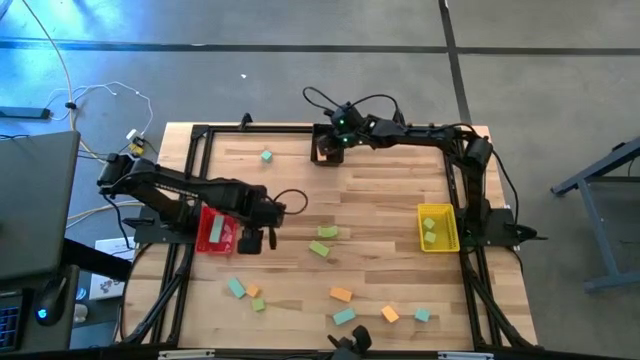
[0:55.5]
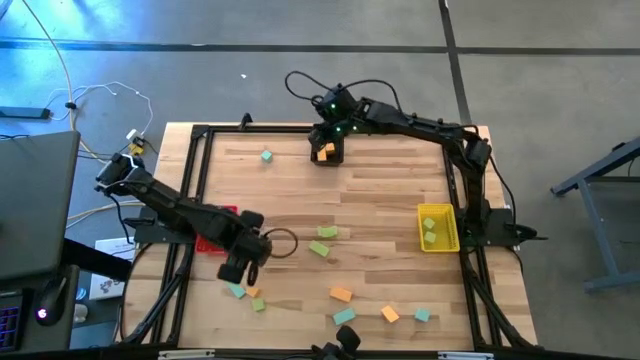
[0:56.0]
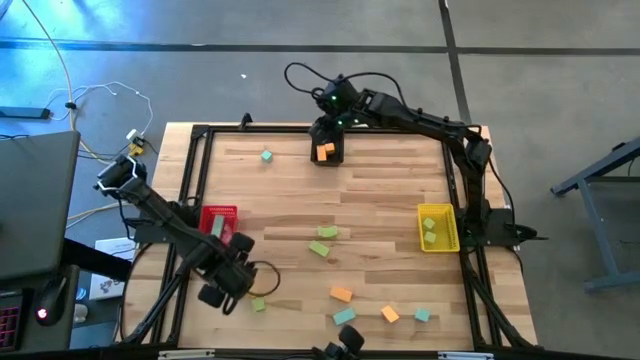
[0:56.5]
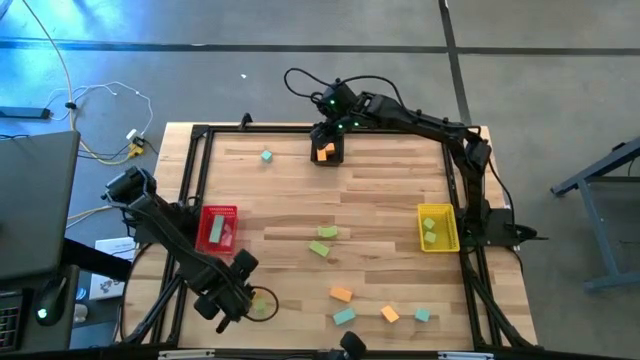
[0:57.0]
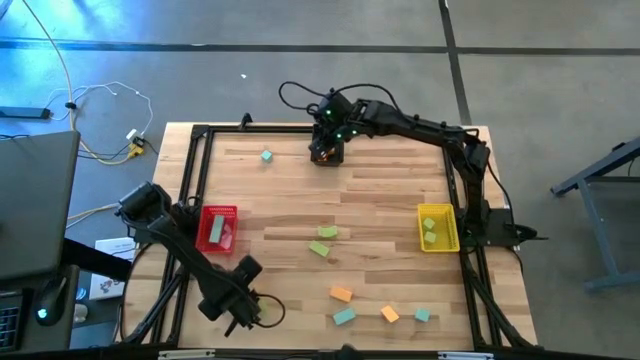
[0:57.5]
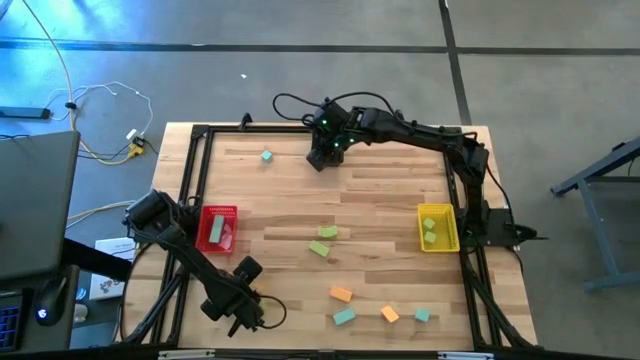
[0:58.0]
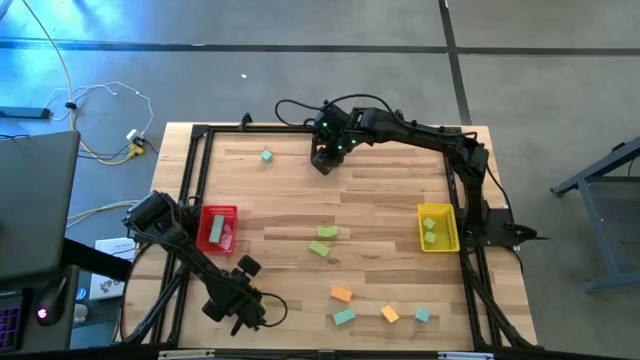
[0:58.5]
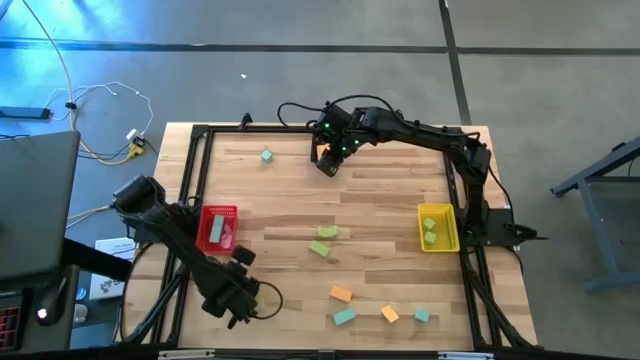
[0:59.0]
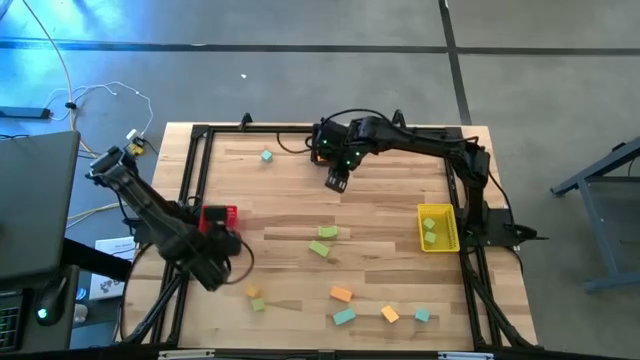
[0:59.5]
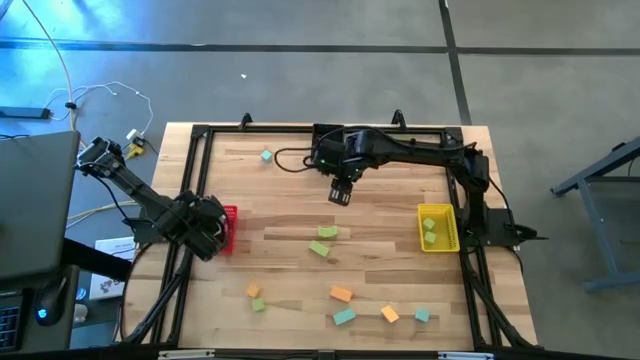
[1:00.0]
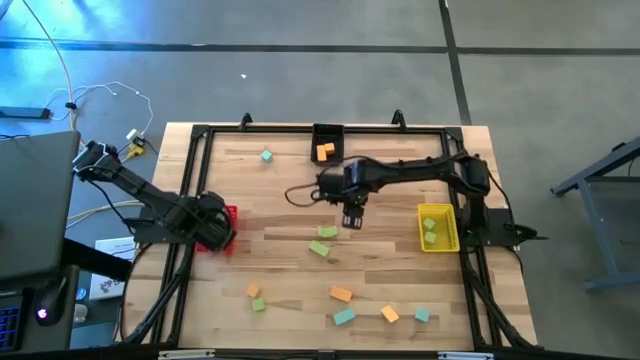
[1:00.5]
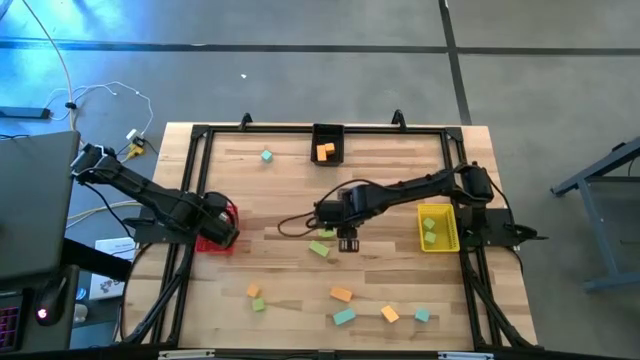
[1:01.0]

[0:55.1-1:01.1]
Task: Sort & place blocks by color
Put the blue block into the red bin

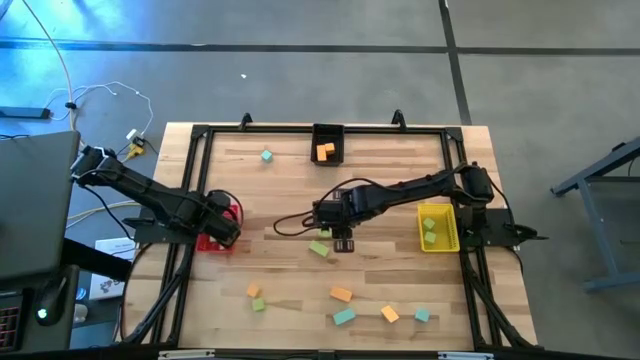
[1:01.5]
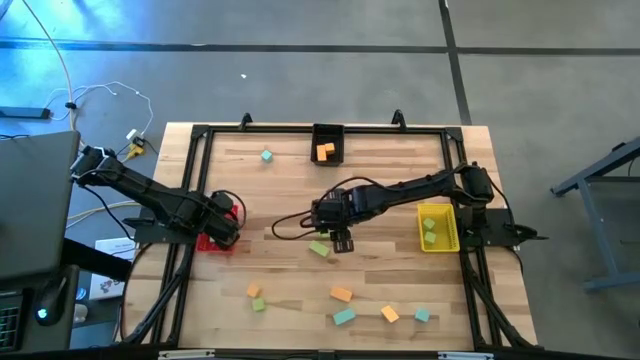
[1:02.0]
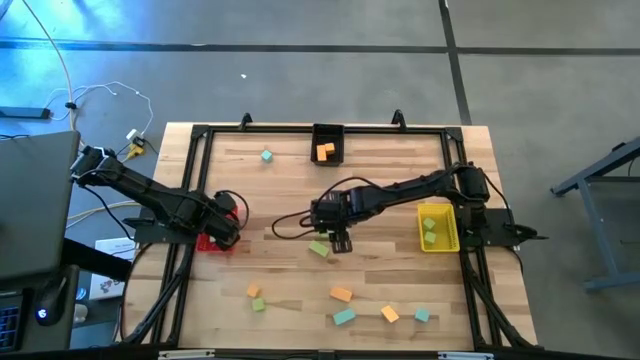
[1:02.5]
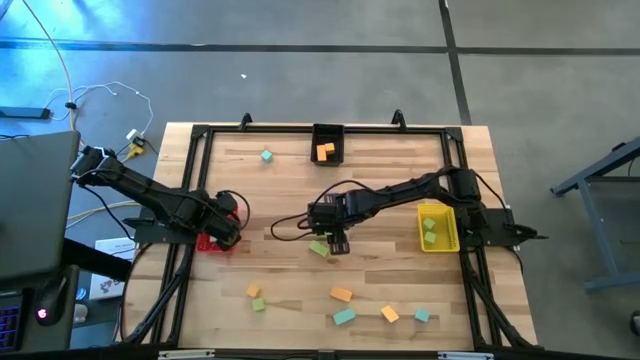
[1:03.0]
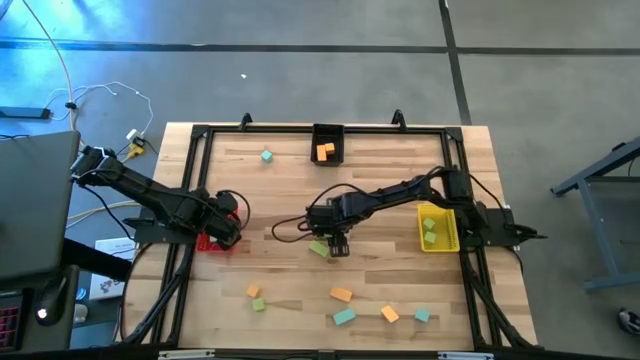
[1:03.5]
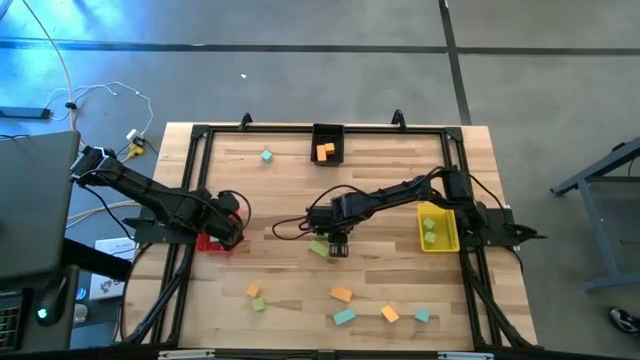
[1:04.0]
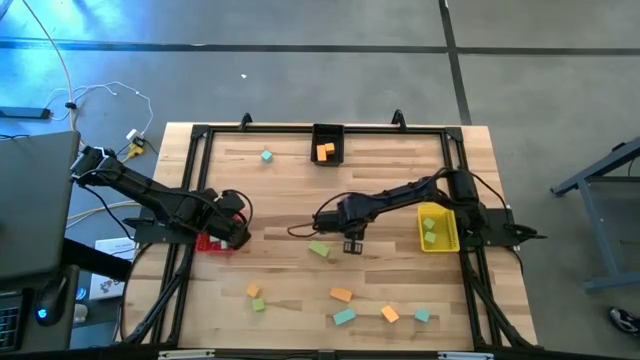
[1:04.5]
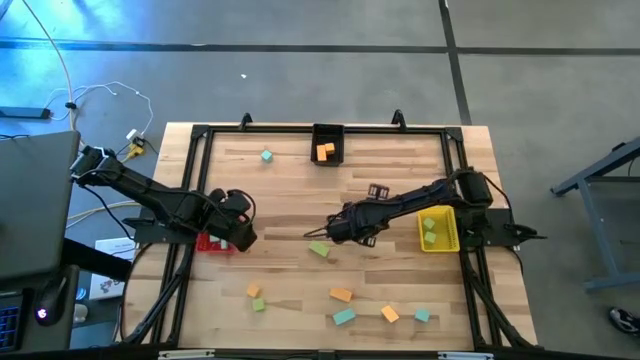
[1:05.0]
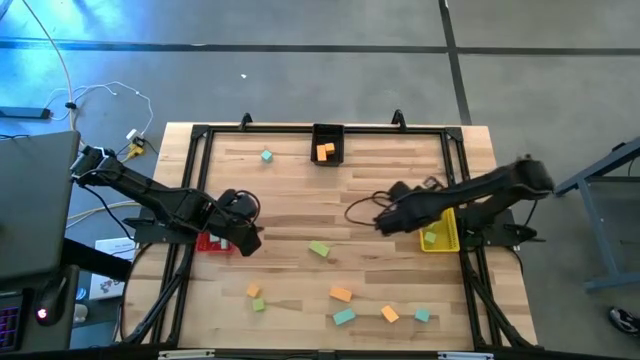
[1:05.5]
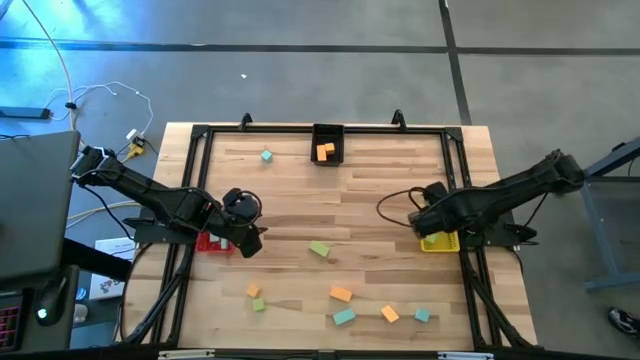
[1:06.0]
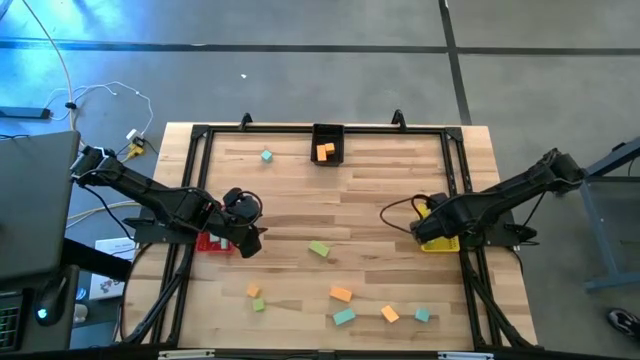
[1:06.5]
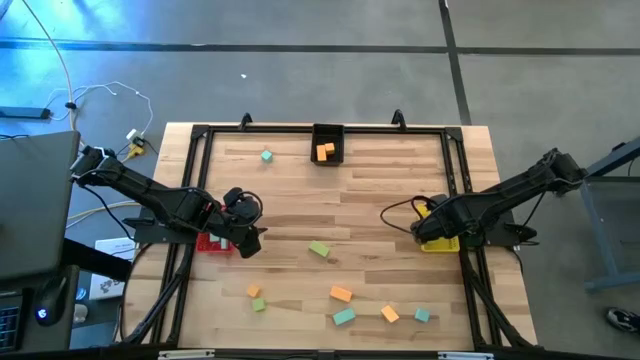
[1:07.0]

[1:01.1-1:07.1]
Put the green block into the yellow bin

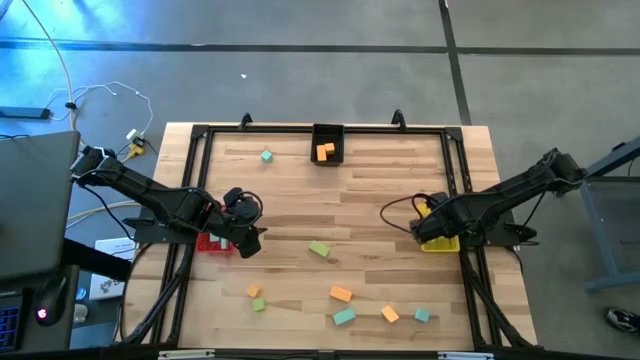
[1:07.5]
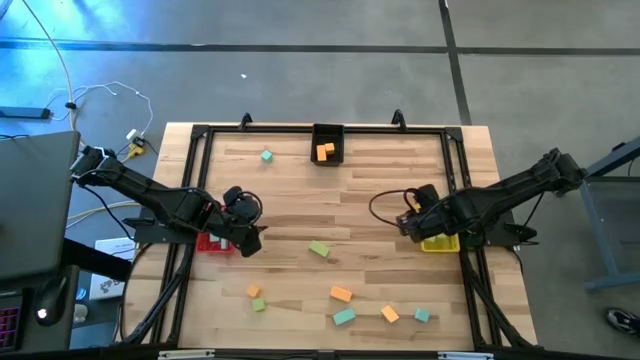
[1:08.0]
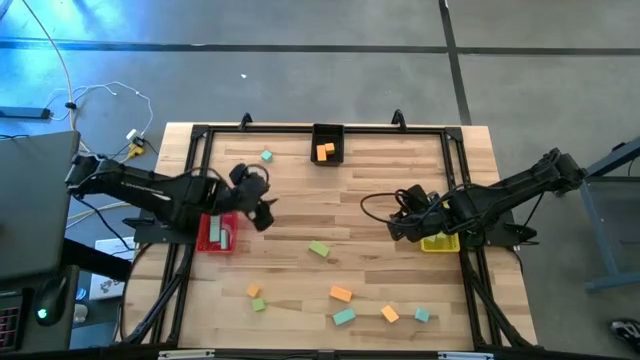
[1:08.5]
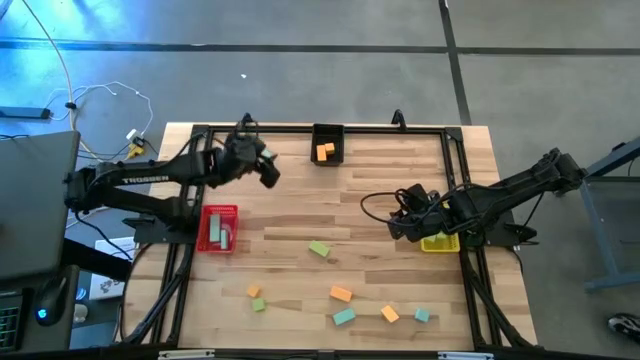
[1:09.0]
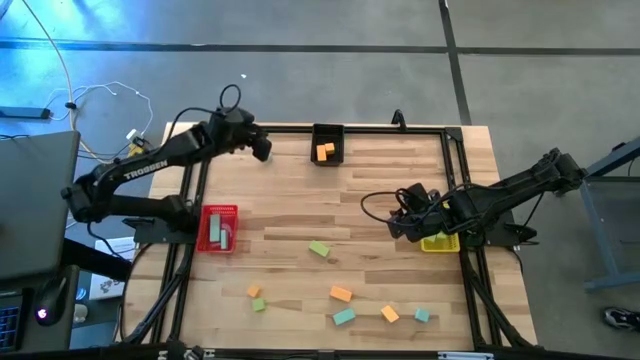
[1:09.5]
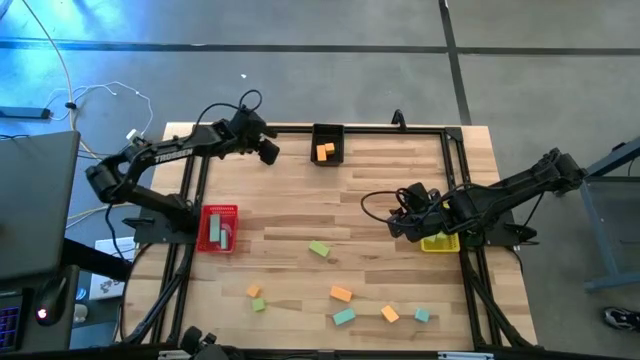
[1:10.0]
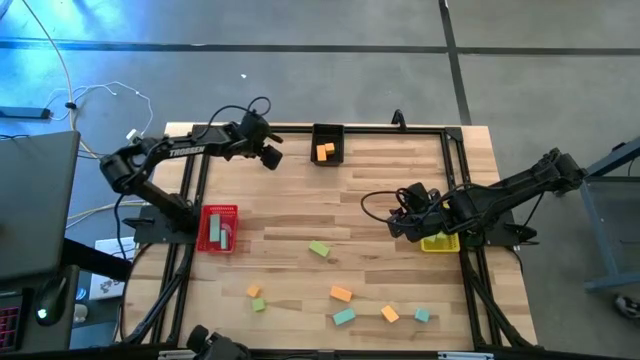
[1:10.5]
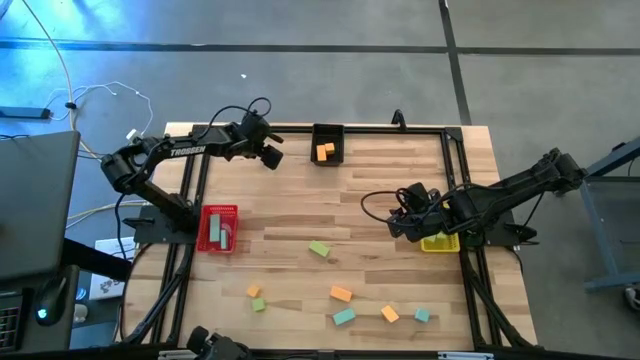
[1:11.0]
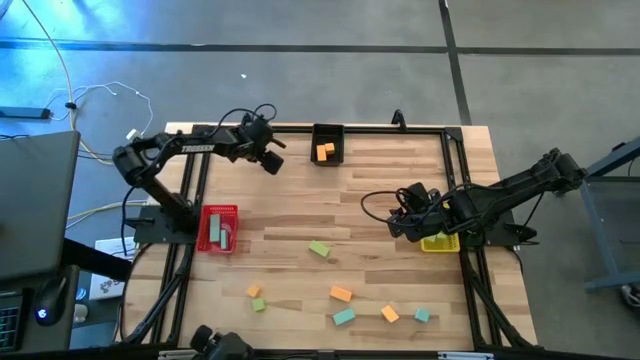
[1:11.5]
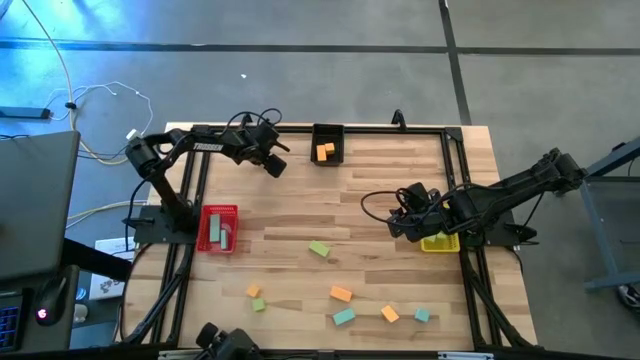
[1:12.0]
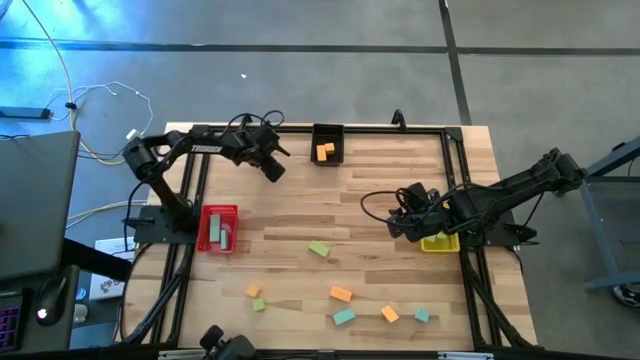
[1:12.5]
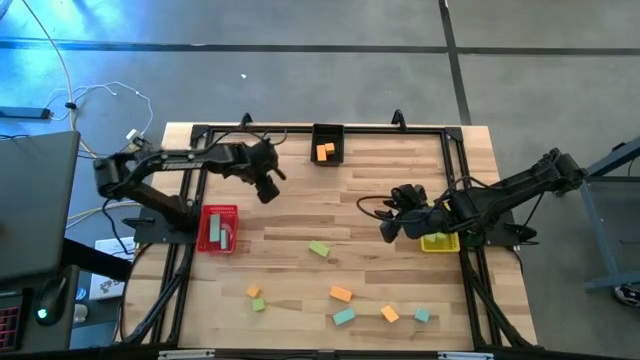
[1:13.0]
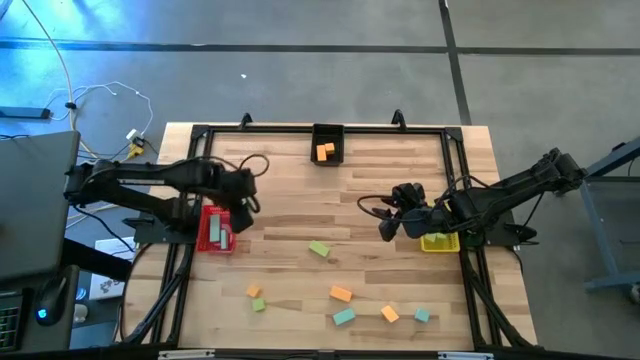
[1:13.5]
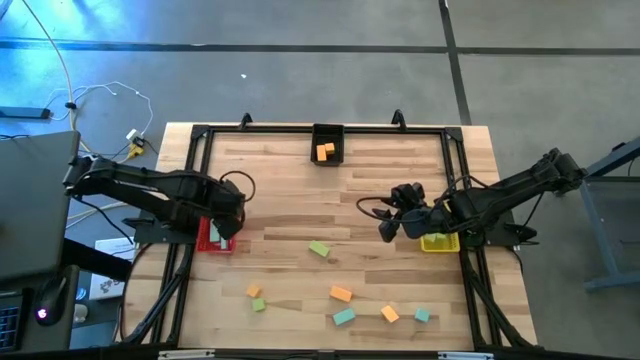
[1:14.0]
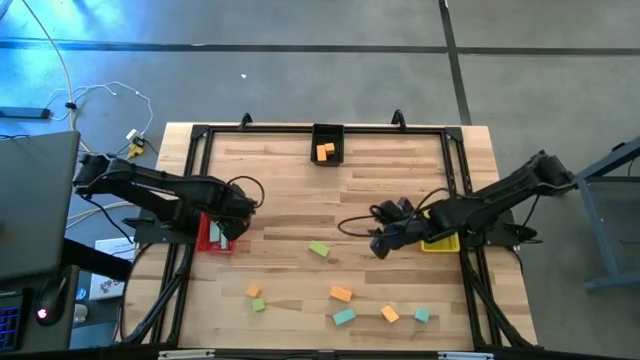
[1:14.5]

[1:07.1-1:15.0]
Put the blue block into the red bin

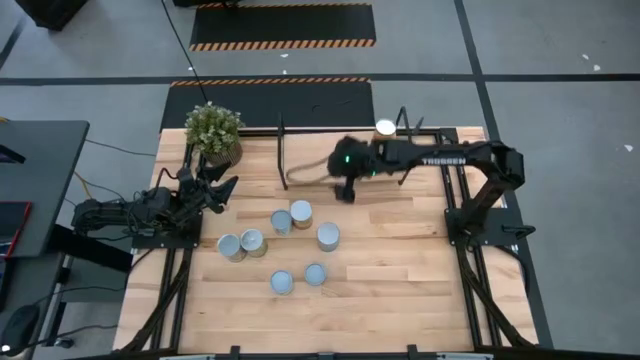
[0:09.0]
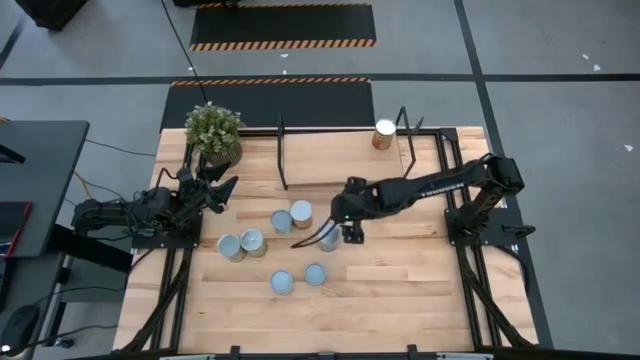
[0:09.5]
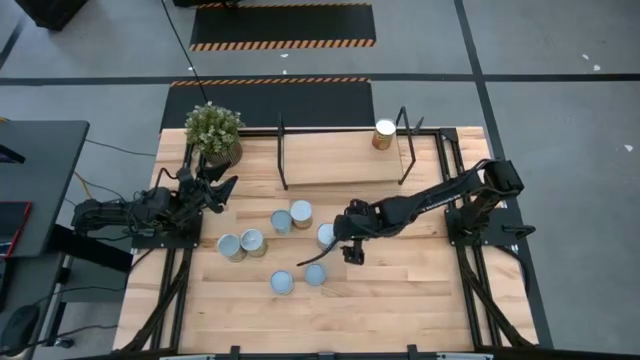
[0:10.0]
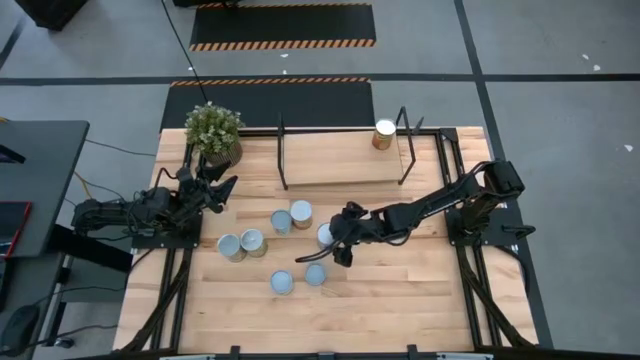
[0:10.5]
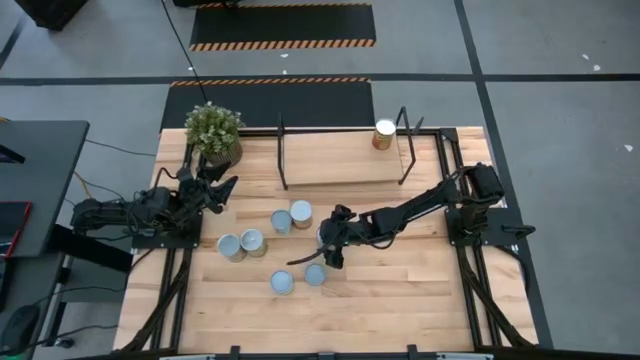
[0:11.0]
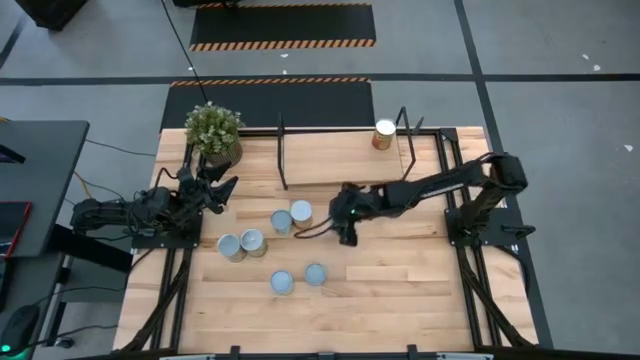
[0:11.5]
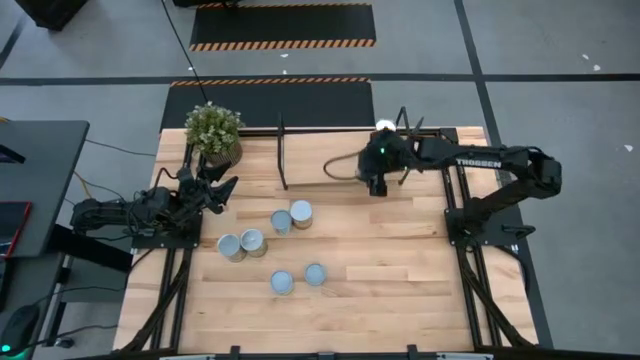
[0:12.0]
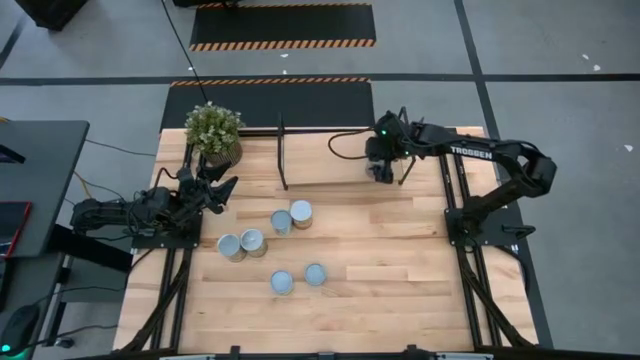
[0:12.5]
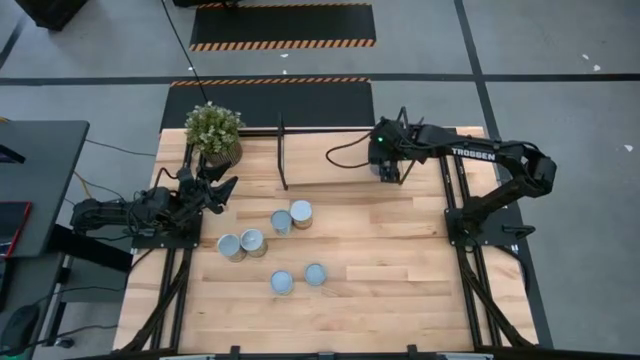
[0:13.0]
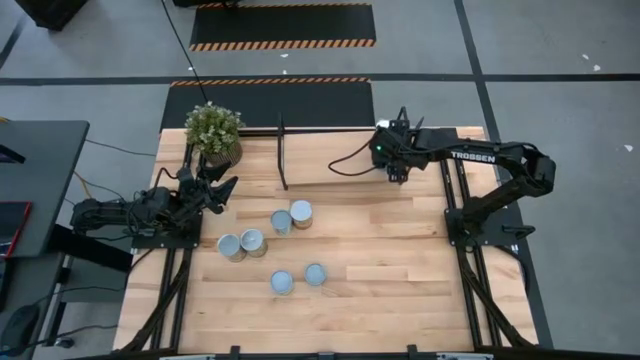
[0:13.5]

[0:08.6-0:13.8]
Task: Pick and place cans onto a shelf
Put the canned cherries on the shelf
